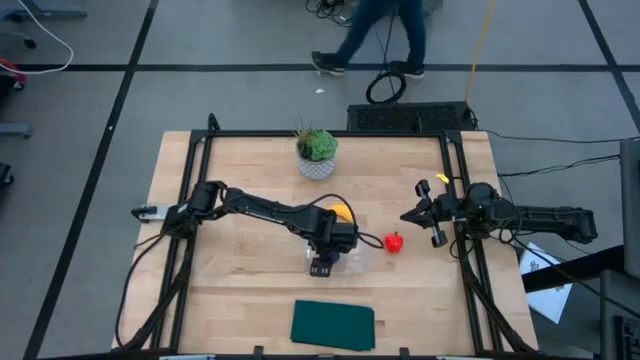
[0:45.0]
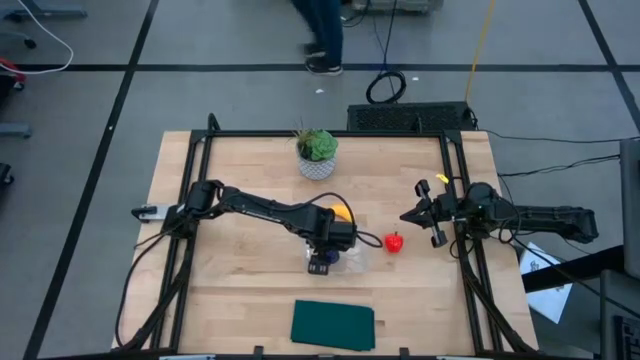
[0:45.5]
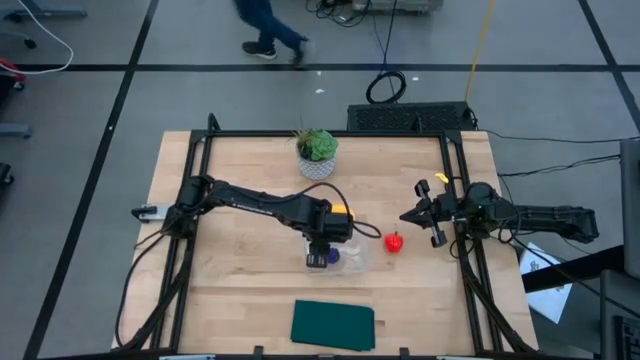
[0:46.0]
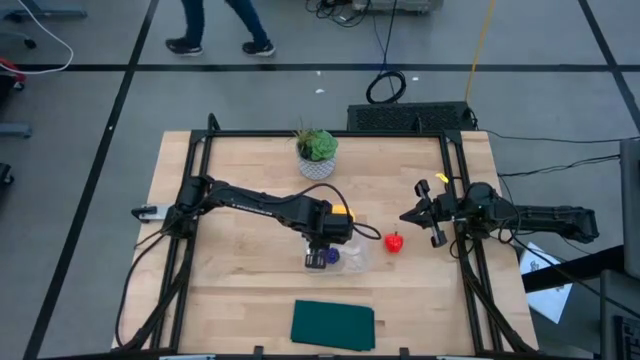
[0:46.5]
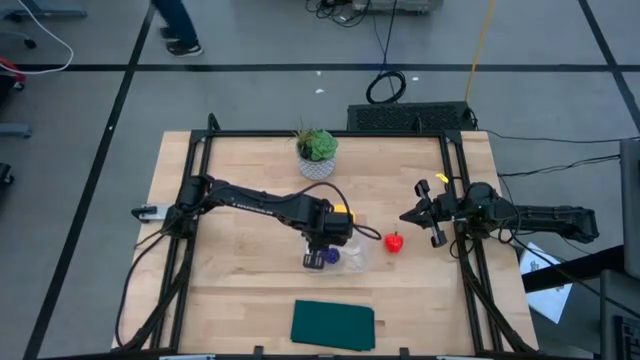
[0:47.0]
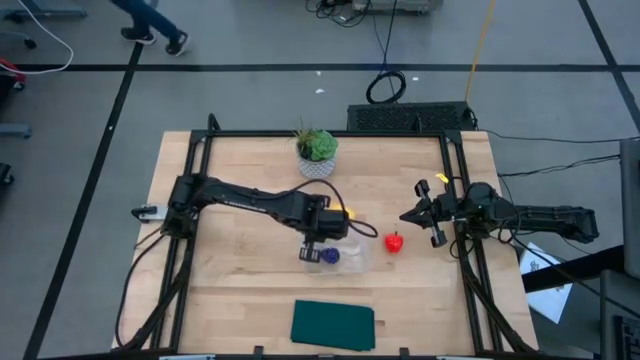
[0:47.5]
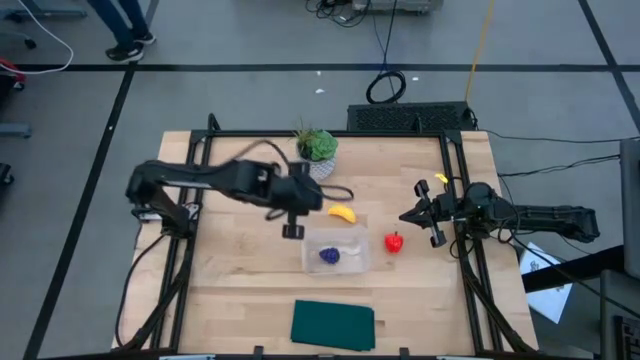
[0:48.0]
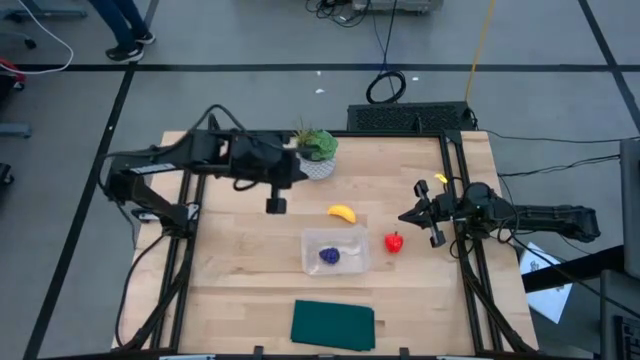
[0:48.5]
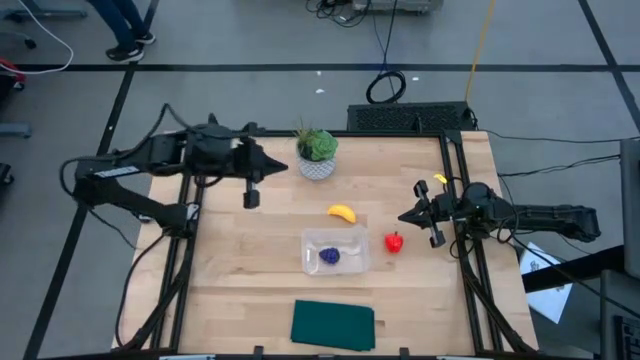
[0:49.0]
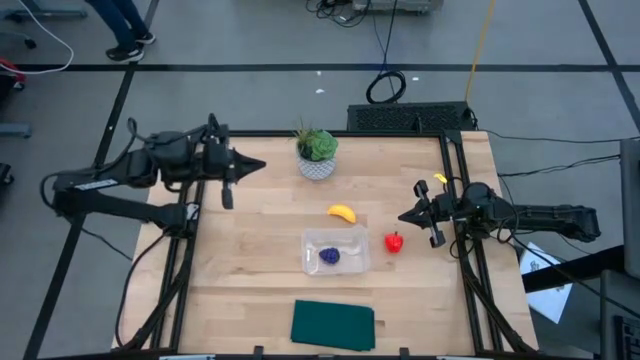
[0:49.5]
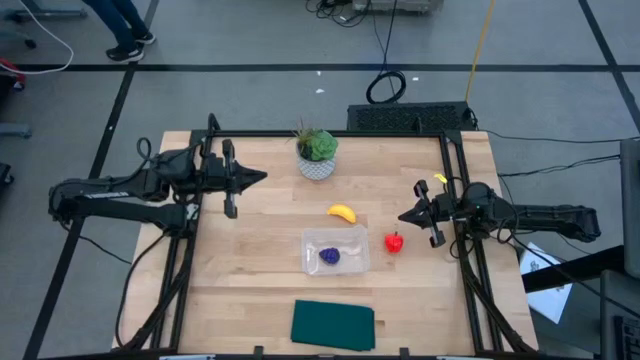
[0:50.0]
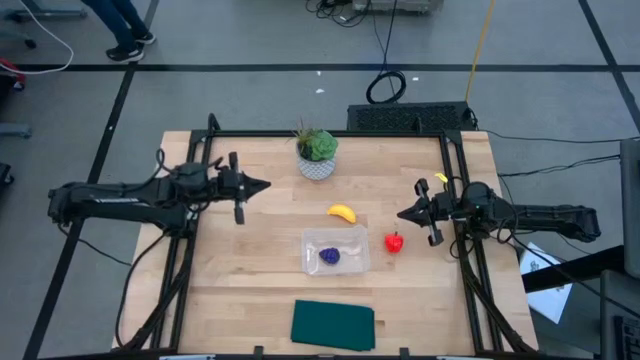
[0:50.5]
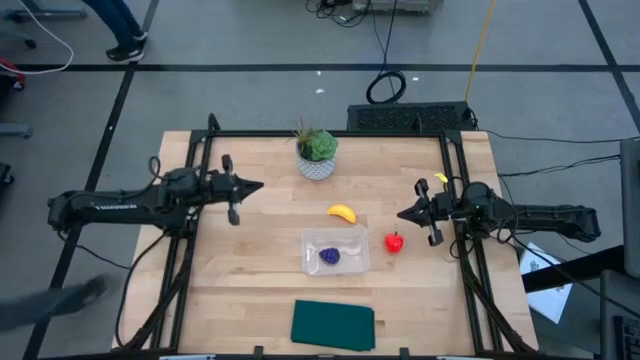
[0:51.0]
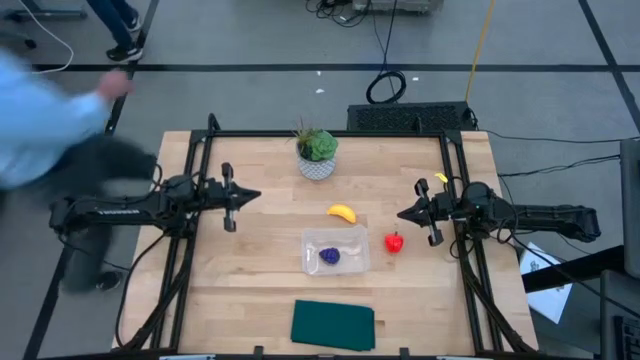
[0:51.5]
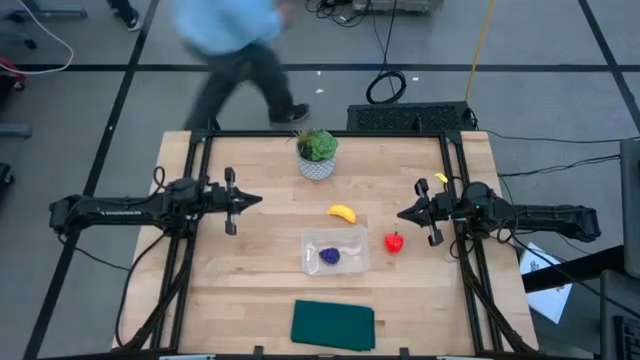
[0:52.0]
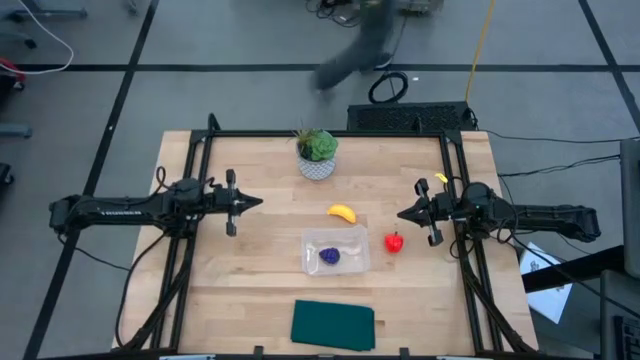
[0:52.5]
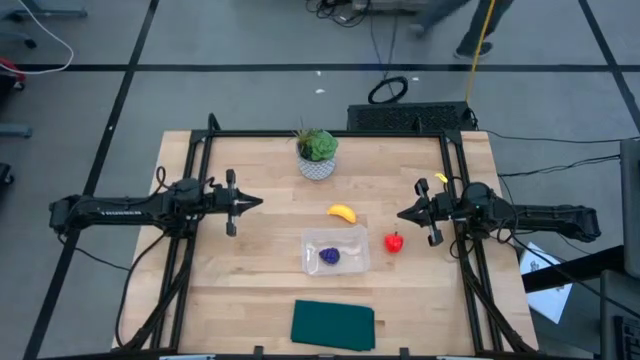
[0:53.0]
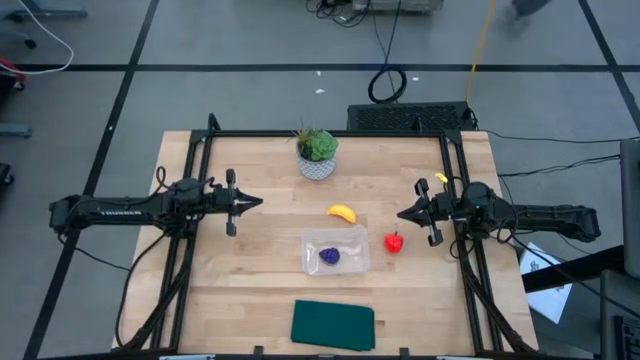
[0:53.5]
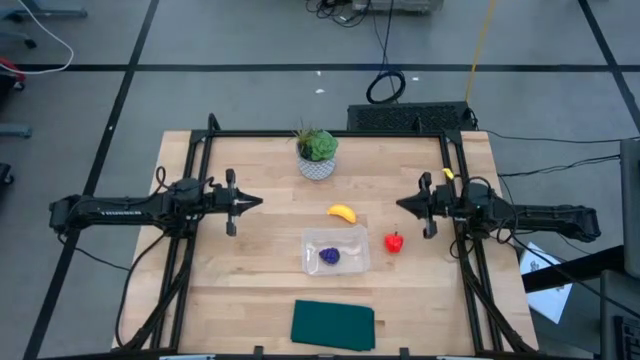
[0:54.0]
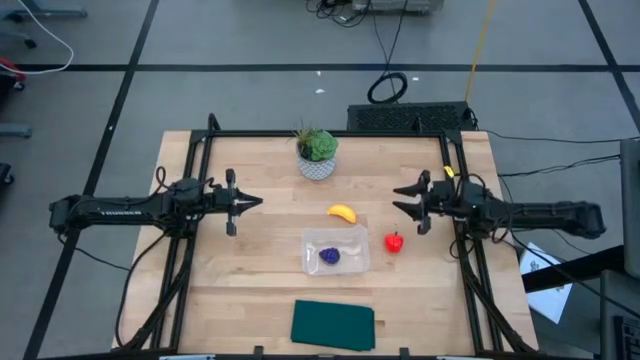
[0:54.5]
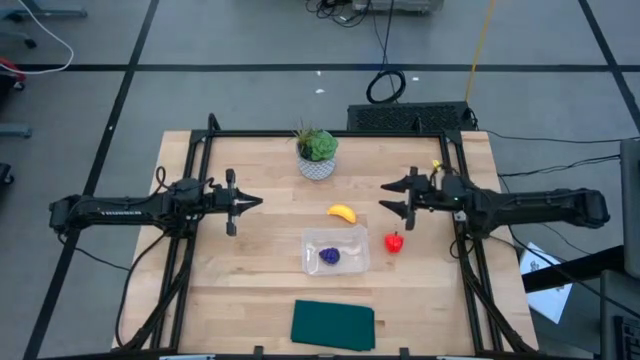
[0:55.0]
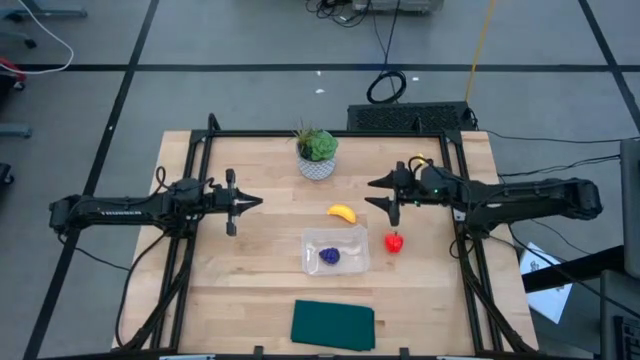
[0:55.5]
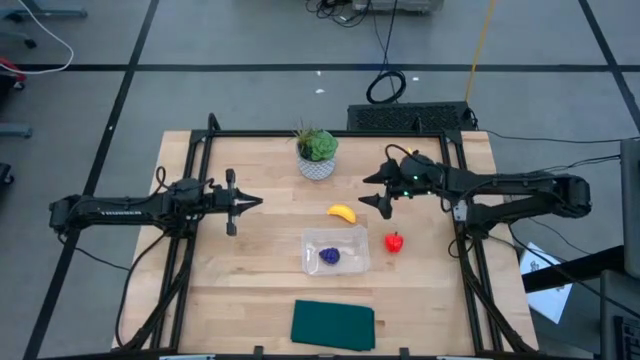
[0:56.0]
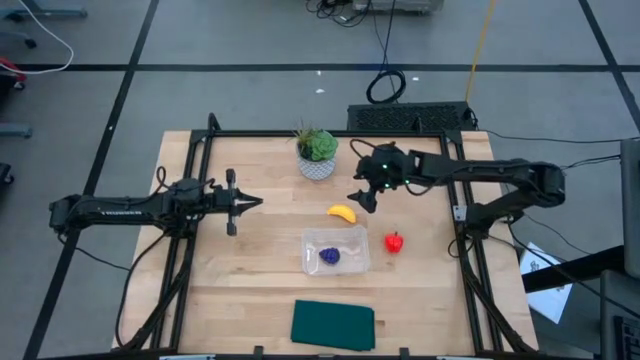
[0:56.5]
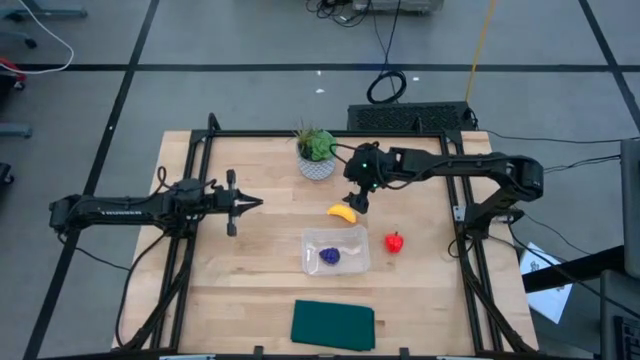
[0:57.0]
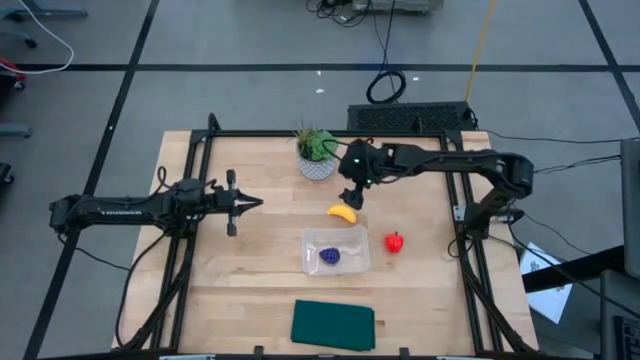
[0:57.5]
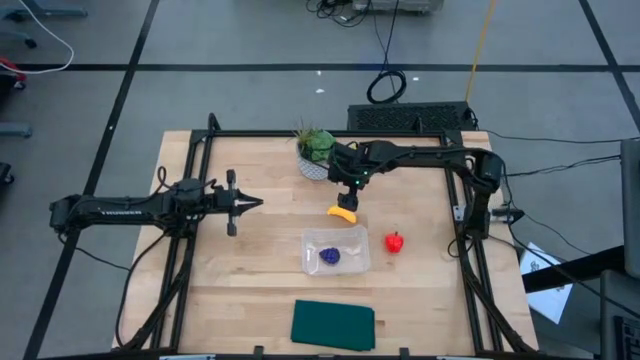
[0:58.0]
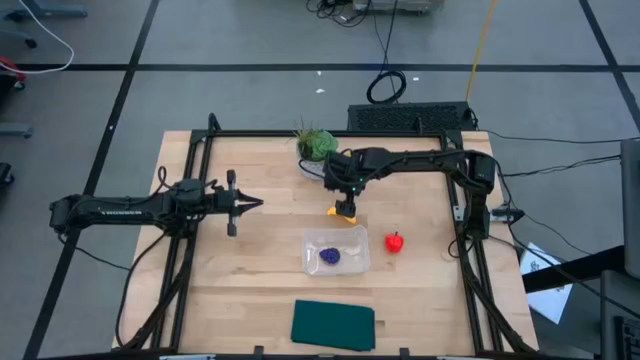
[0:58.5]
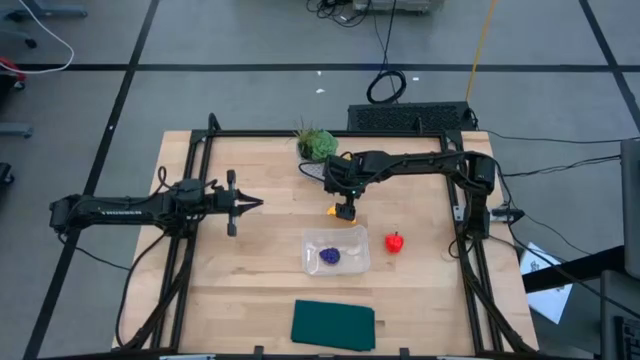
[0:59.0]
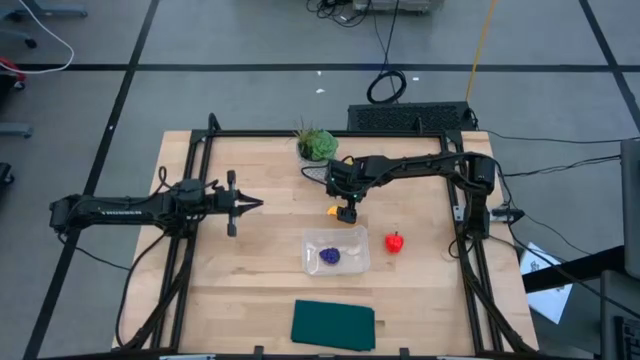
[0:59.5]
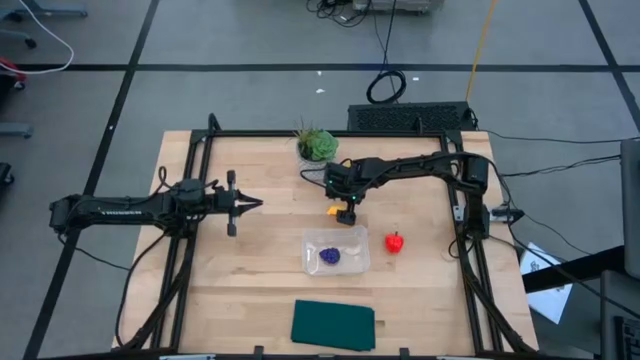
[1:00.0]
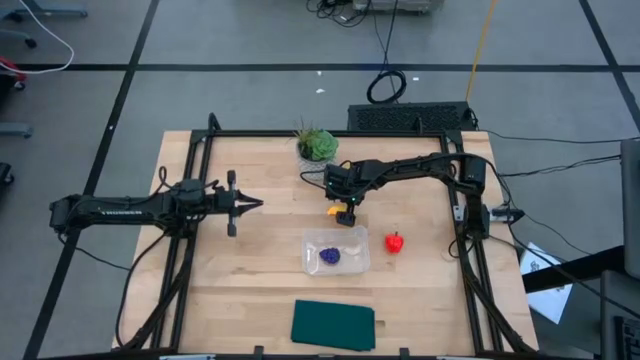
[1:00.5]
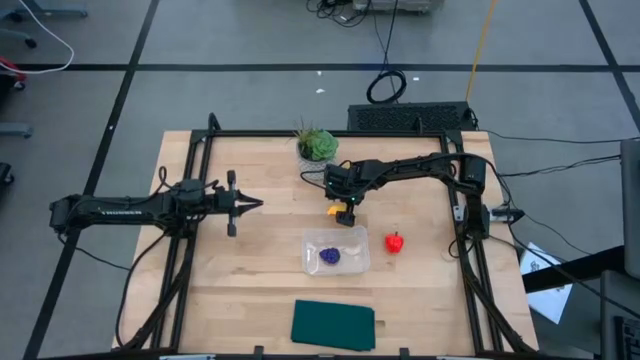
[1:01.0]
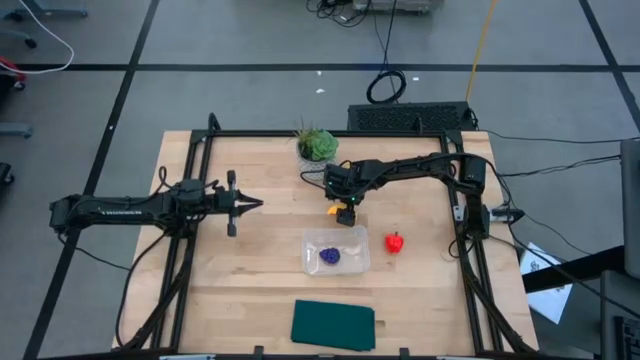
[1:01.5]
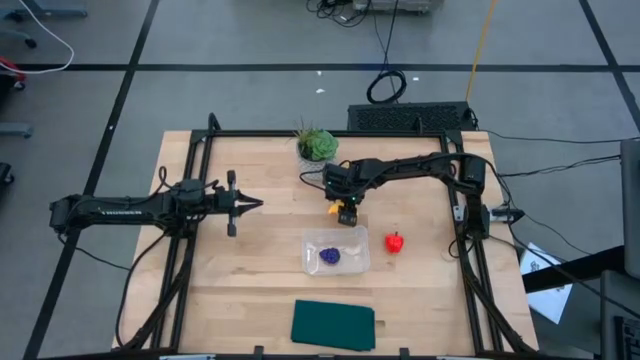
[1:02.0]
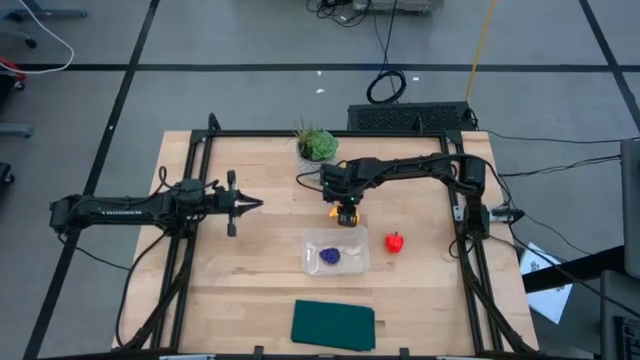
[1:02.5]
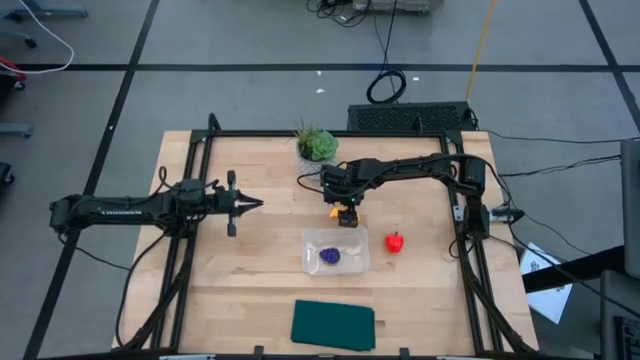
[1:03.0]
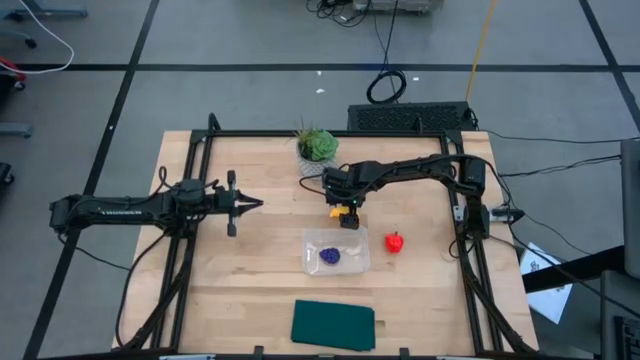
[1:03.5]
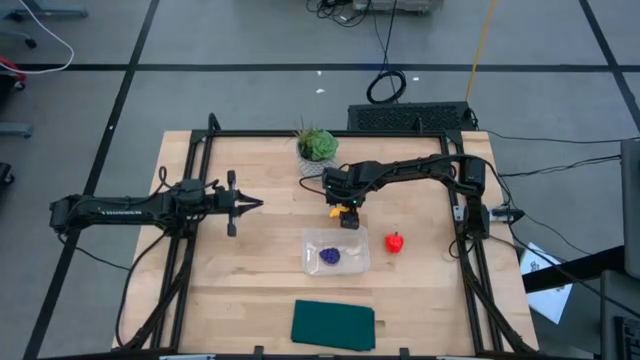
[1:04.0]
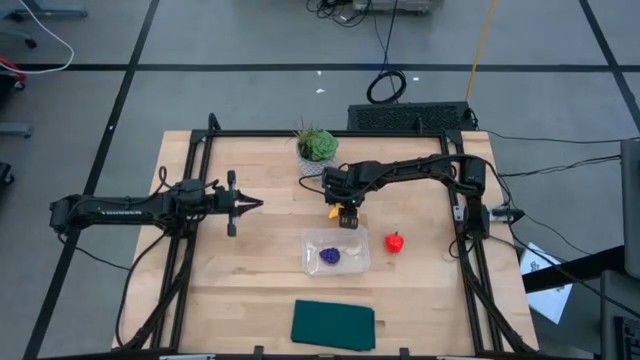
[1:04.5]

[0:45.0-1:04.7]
Task: Pick and placing Produce into tupperware
Put the banana into the transparent bin
